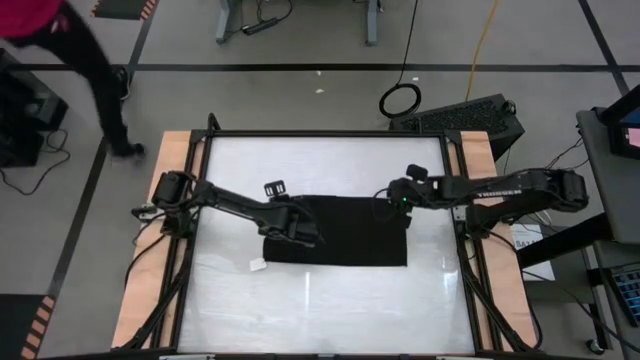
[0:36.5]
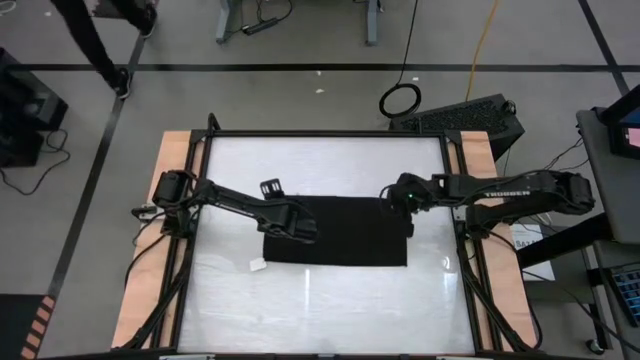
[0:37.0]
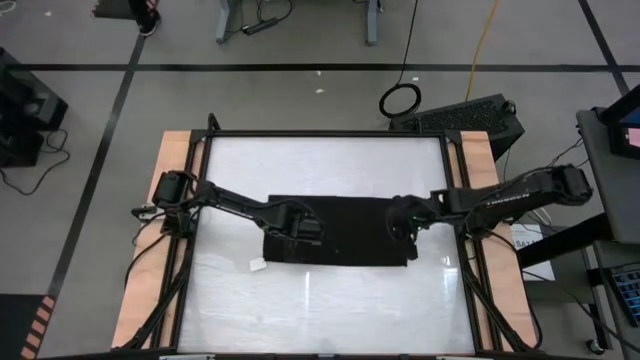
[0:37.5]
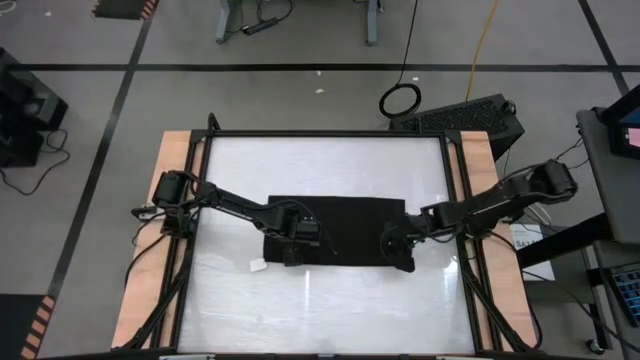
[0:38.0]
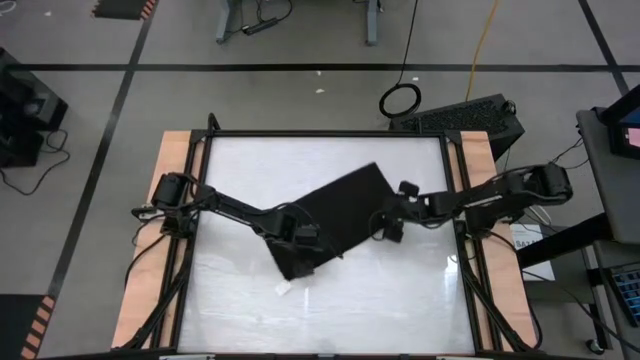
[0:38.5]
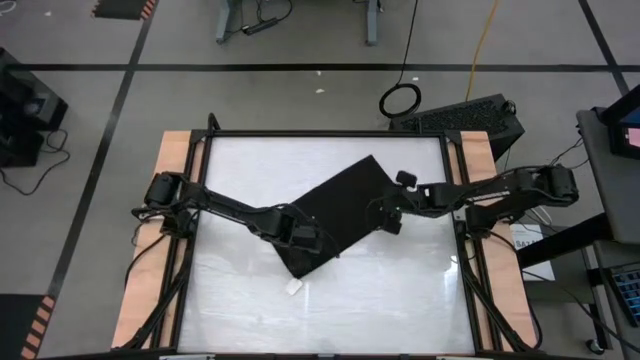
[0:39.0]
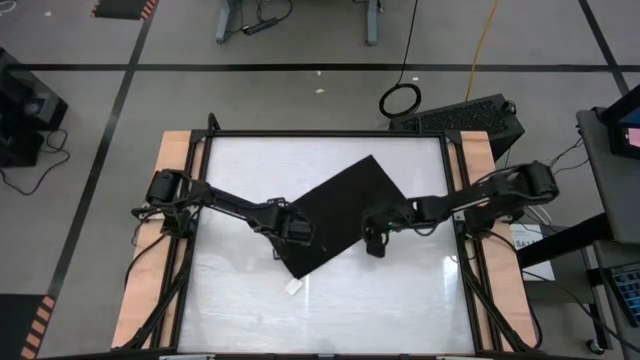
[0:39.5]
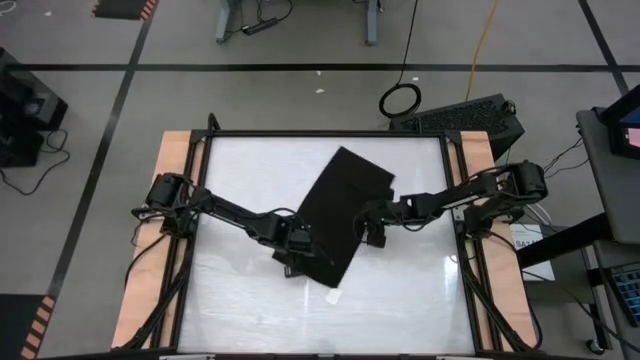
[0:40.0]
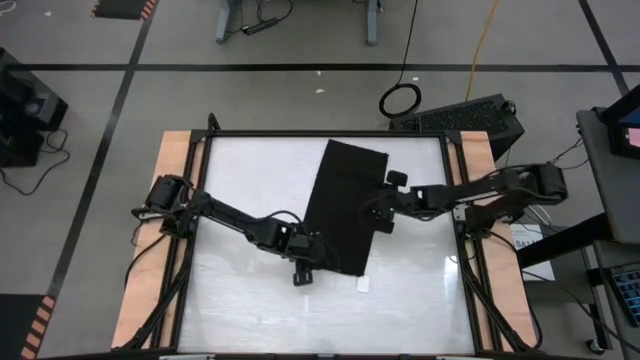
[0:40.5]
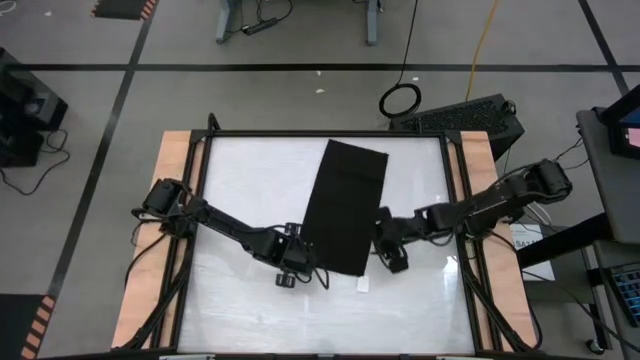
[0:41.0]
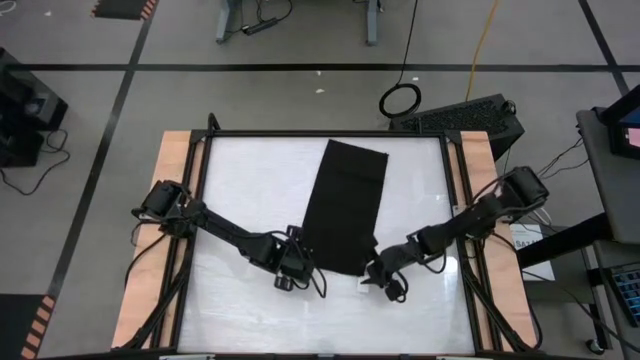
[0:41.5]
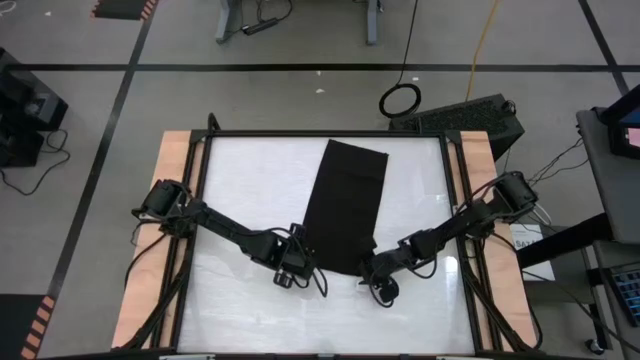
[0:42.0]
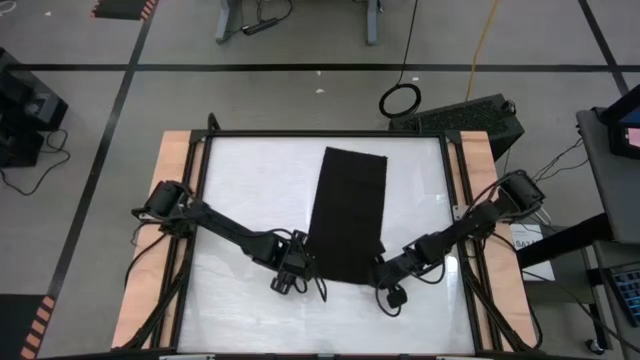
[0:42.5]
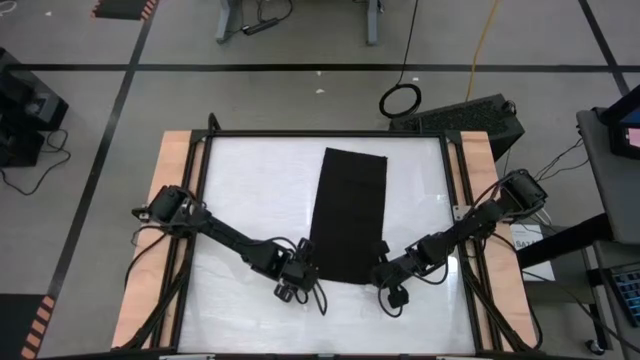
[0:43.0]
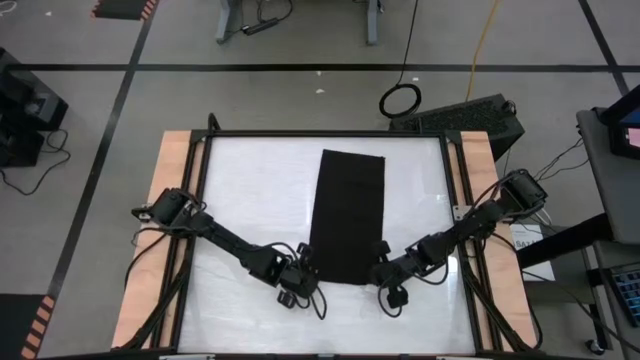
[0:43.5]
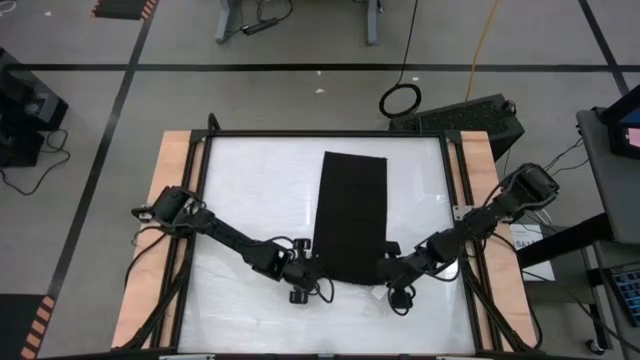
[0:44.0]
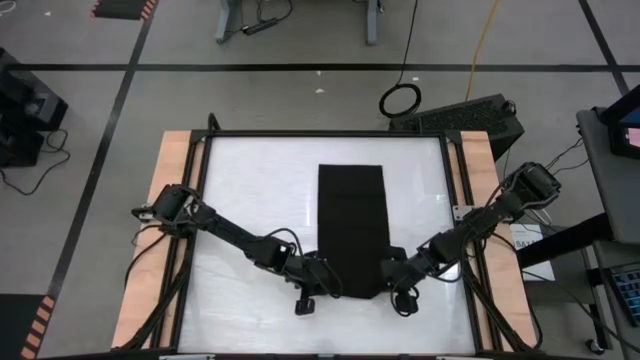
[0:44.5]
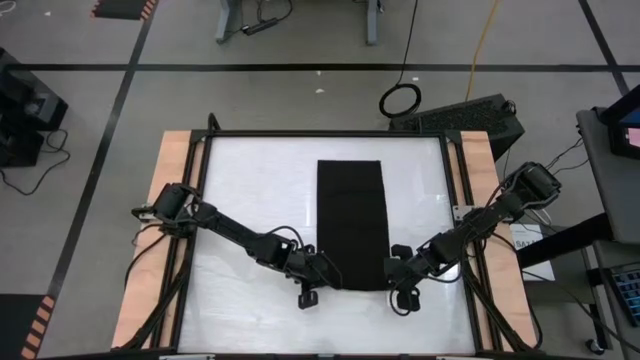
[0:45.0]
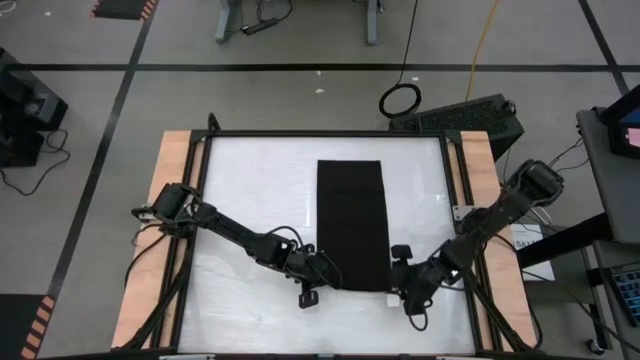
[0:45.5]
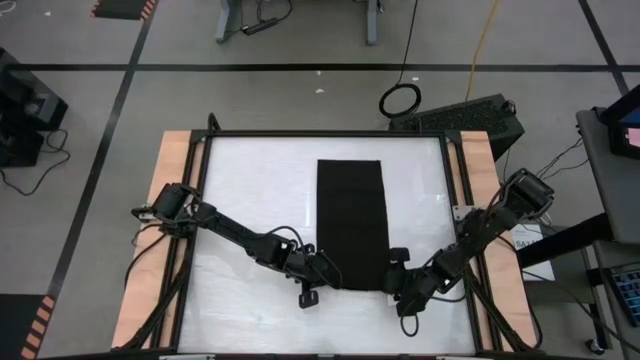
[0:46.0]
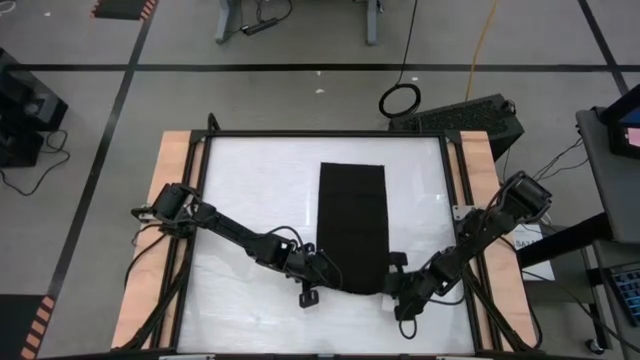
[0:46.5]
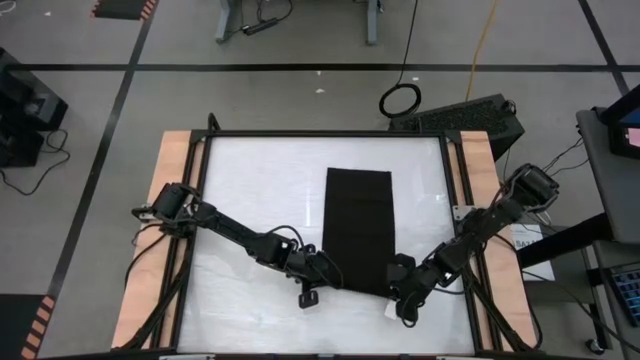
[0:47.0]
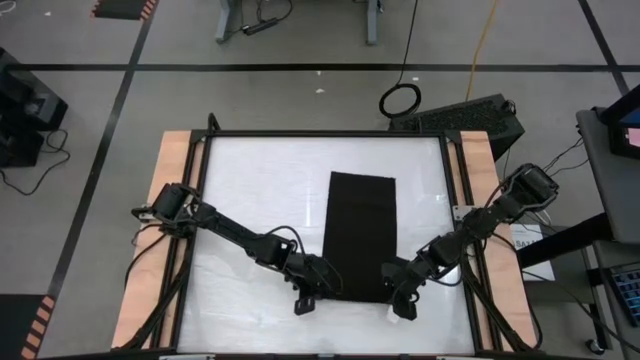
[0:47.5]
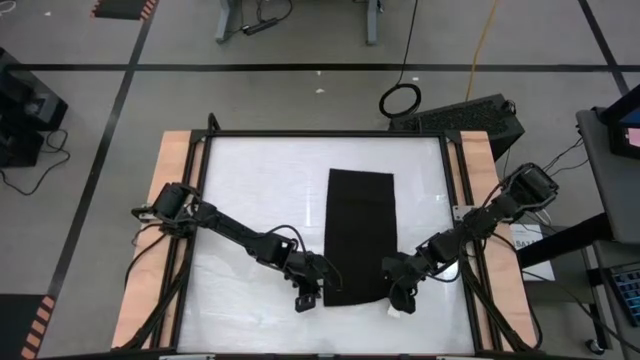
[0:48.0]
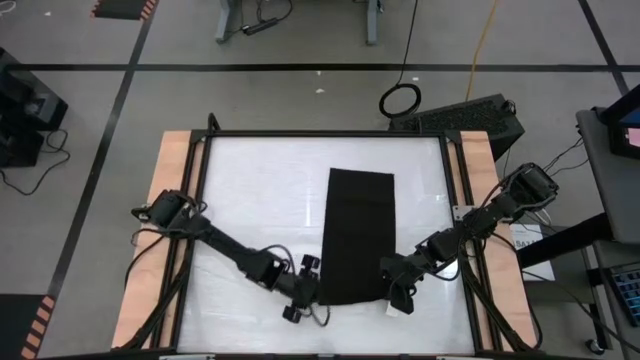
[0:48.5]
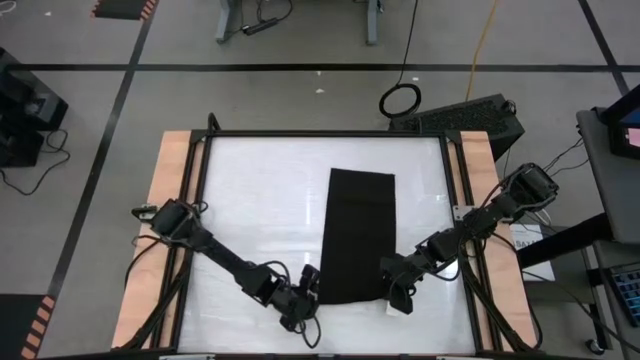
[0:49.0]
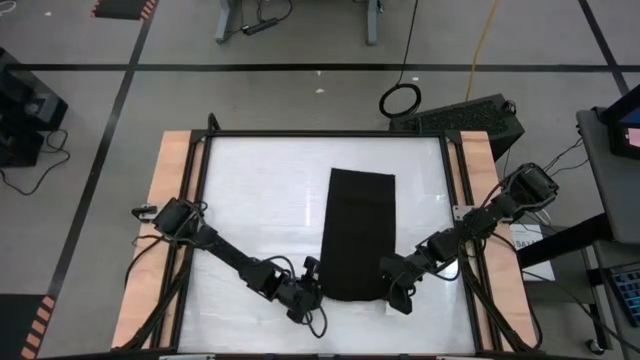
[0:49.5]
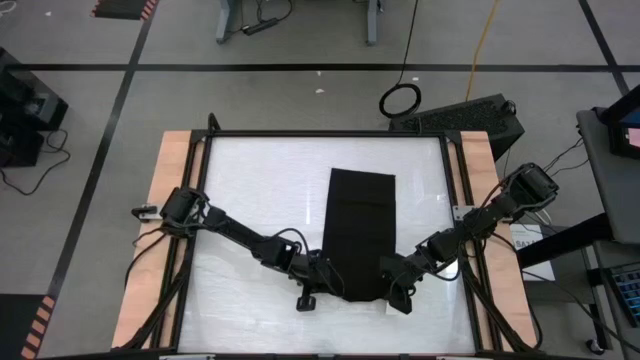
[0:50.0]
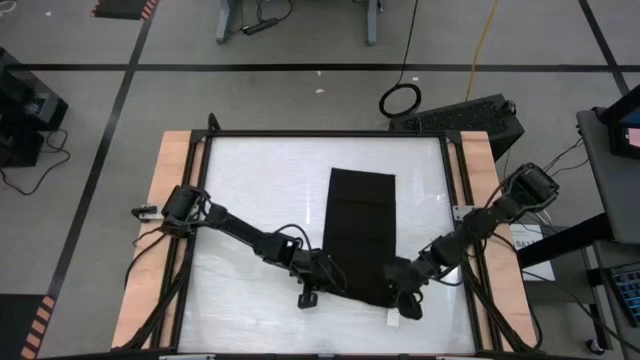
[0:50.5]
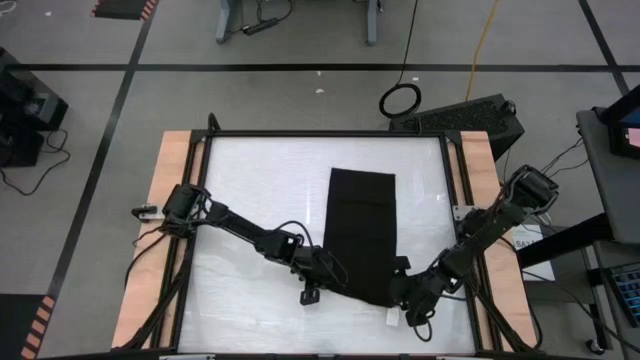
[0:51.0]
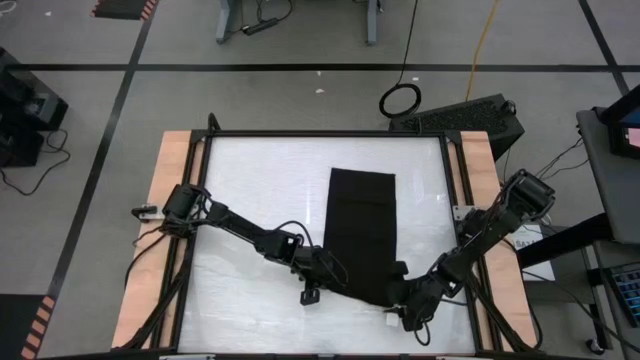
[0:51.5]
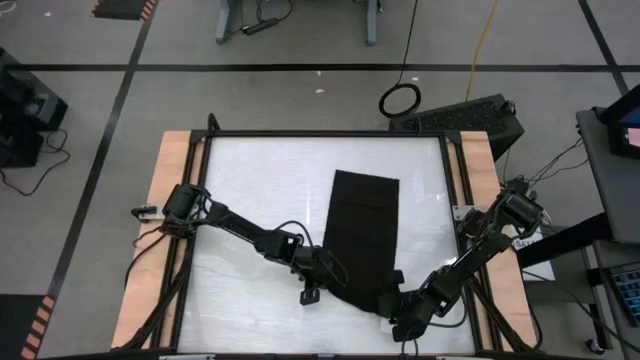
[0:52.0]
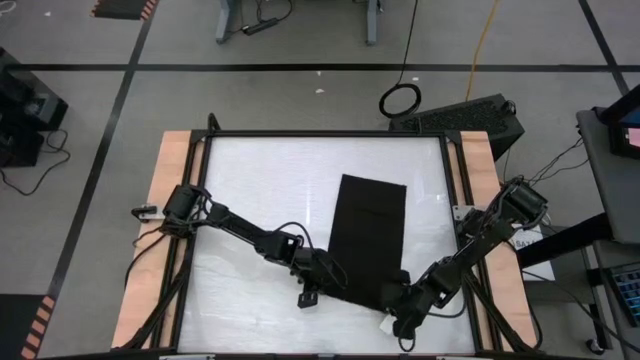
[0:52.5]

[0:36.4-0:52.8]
Task: Roll towel into tight, uniform cylinder
Roll the black towel

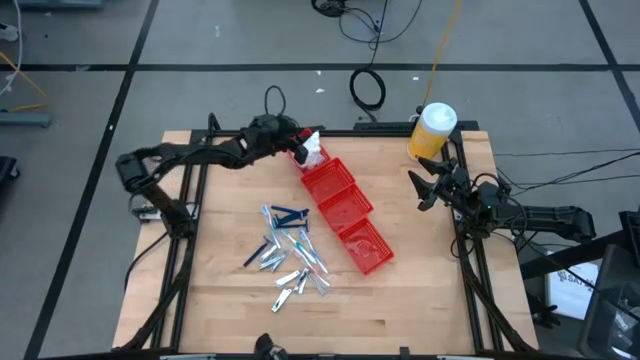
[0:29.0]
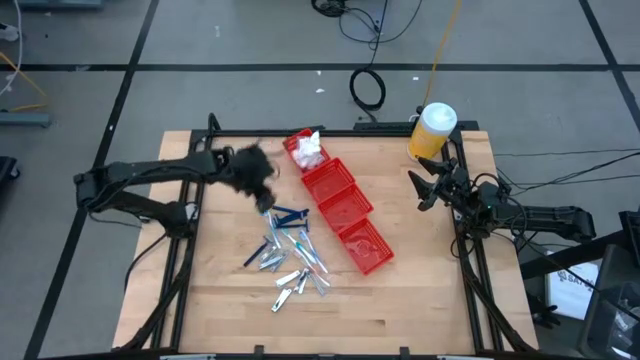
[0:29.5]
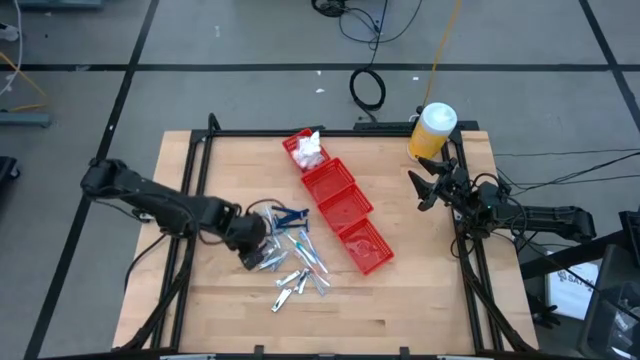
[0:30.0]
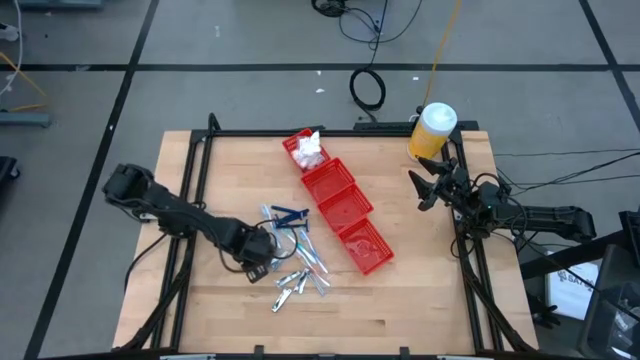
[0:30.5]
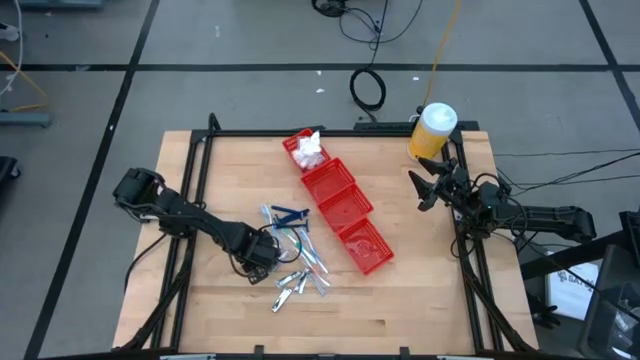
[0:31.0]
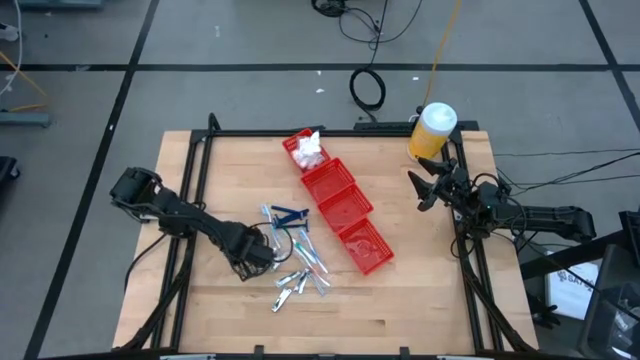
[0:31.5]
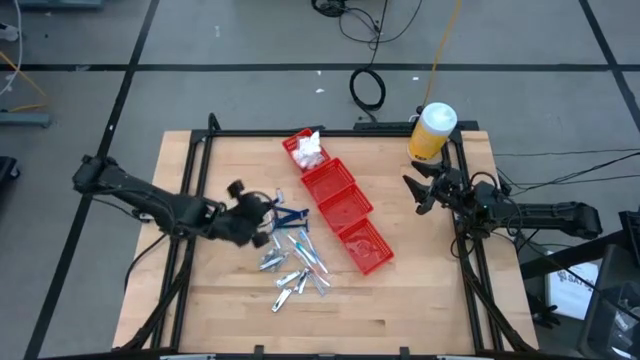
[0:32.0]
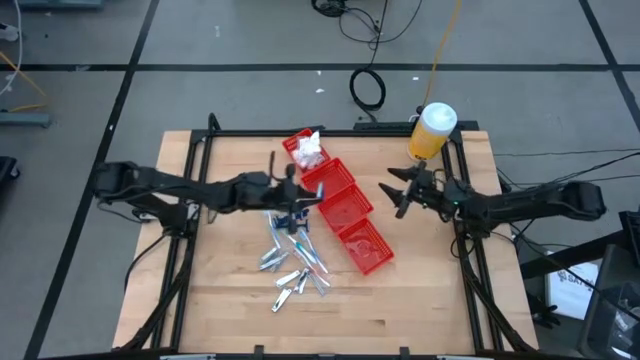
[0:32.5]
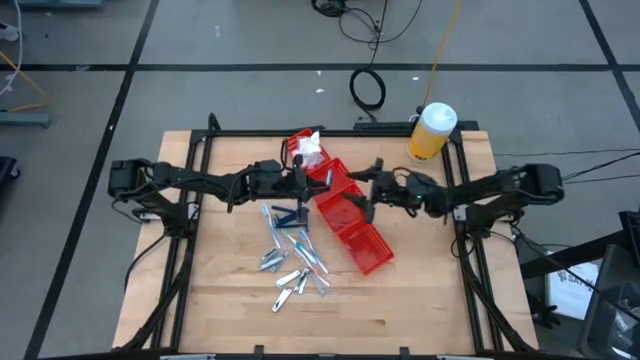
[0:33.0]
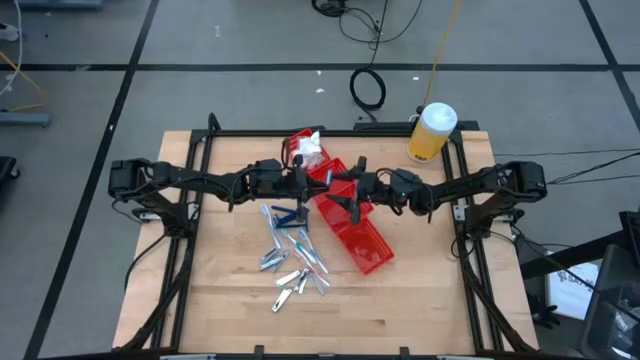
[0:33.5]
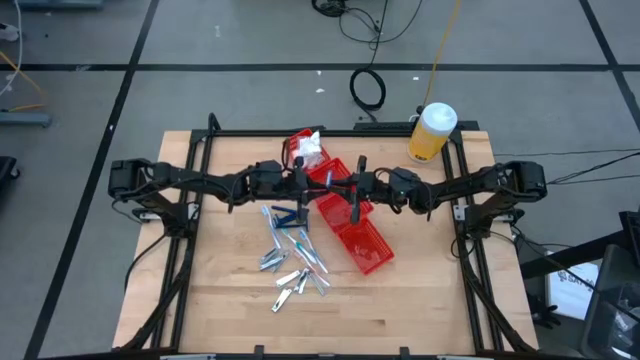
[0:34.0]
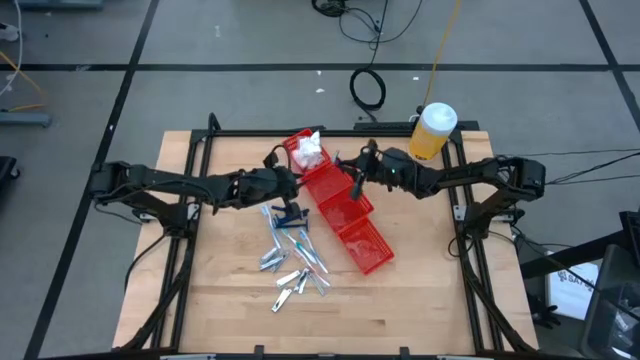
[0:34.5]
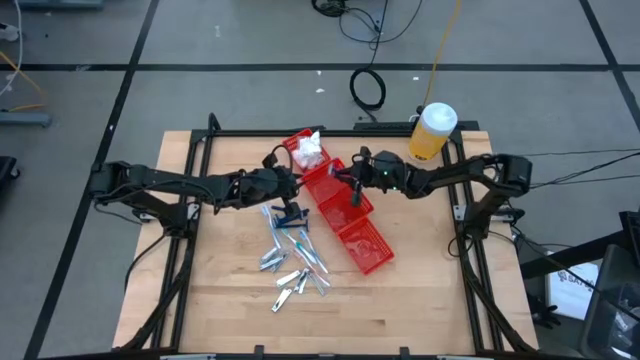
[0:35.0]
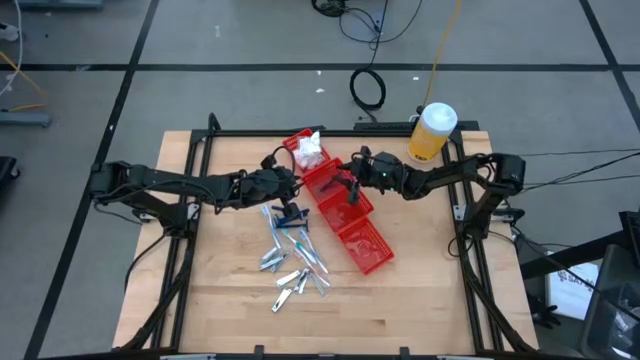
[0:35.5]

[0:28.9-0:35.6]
Task: Pick & Place Travel size toiletries
Put the blue razor into the top middle red bin
